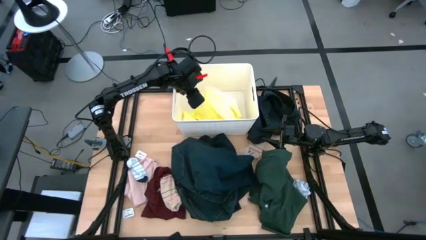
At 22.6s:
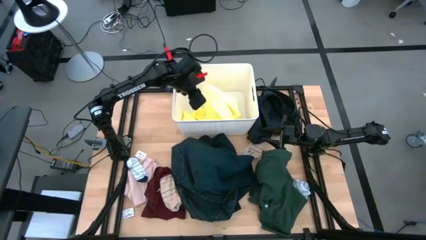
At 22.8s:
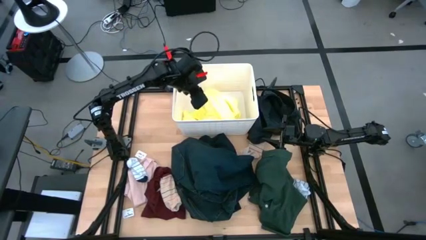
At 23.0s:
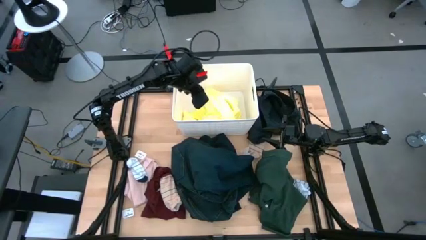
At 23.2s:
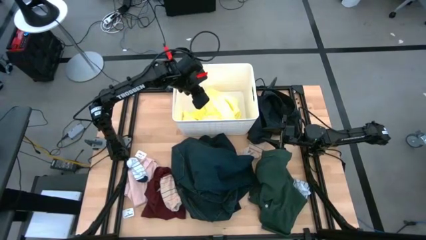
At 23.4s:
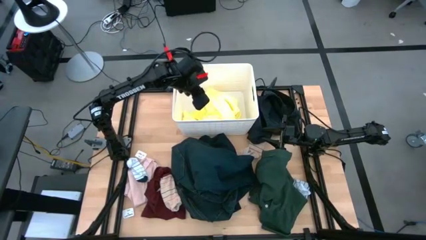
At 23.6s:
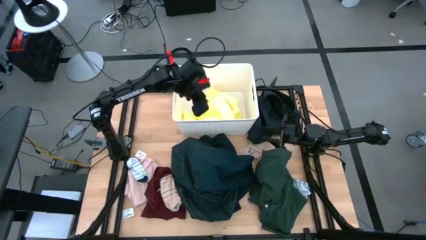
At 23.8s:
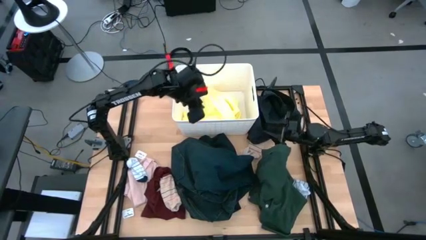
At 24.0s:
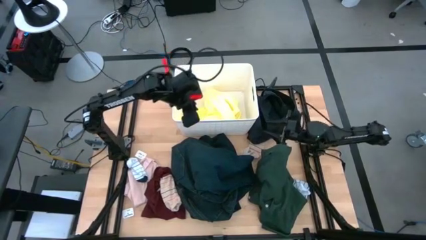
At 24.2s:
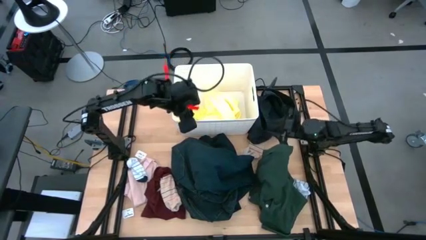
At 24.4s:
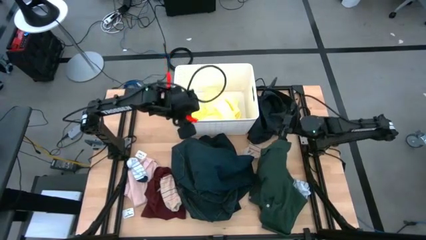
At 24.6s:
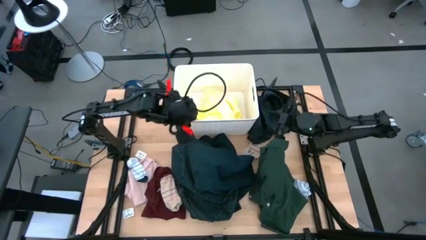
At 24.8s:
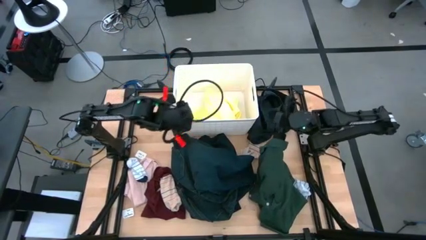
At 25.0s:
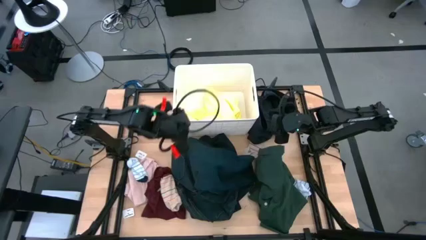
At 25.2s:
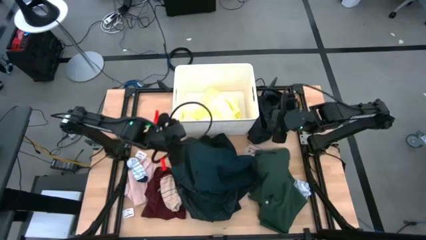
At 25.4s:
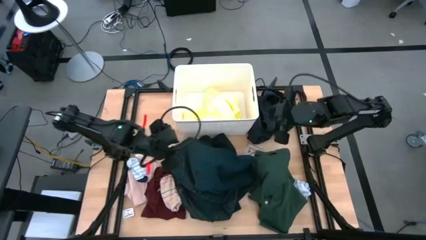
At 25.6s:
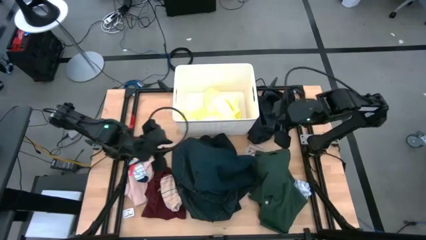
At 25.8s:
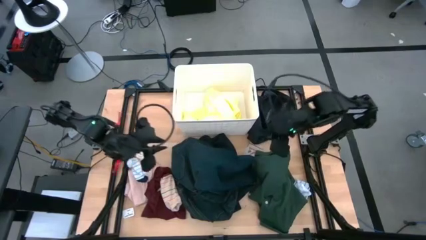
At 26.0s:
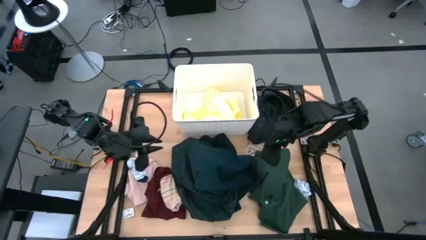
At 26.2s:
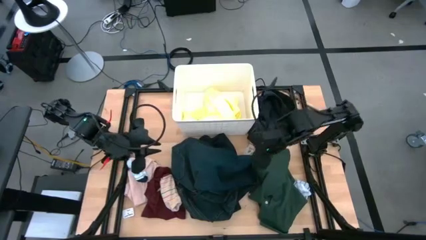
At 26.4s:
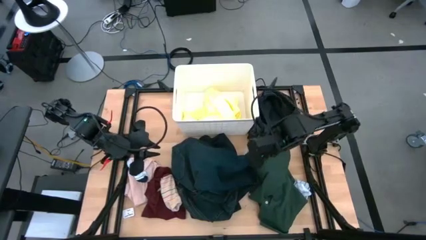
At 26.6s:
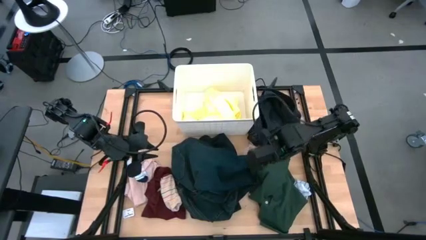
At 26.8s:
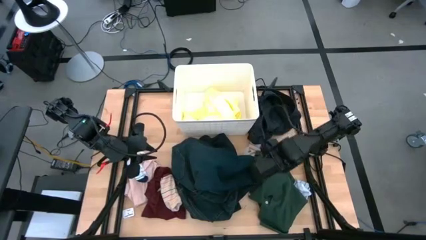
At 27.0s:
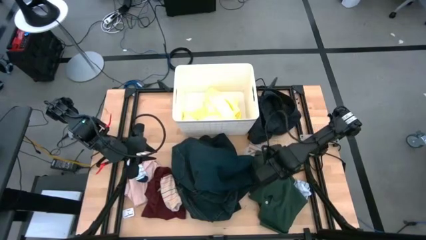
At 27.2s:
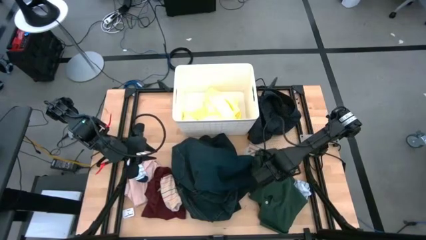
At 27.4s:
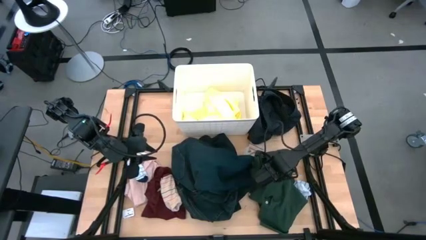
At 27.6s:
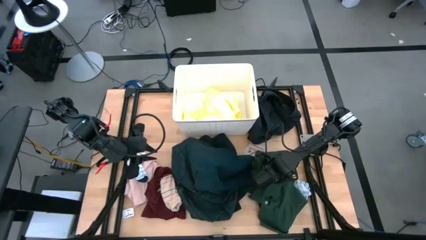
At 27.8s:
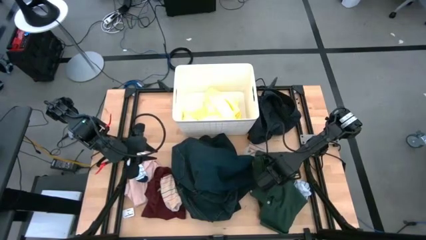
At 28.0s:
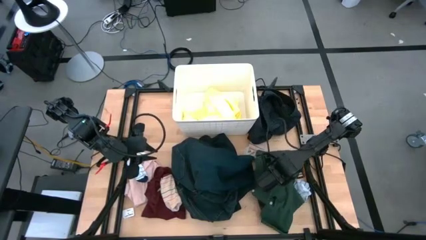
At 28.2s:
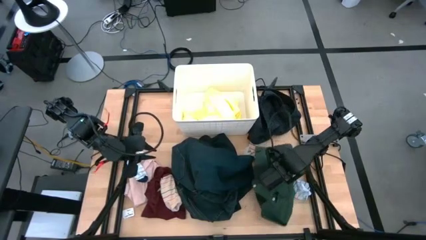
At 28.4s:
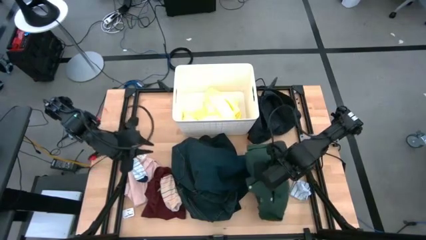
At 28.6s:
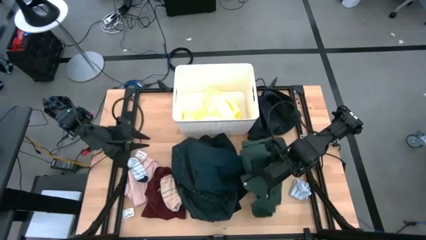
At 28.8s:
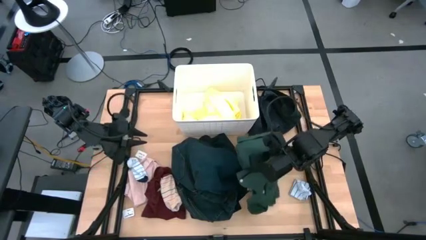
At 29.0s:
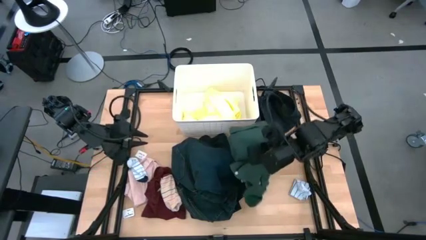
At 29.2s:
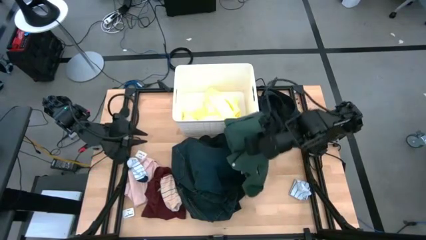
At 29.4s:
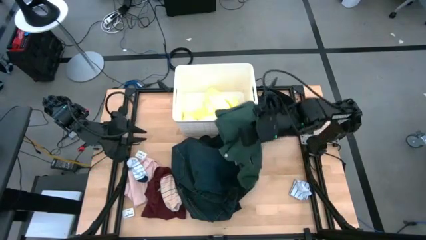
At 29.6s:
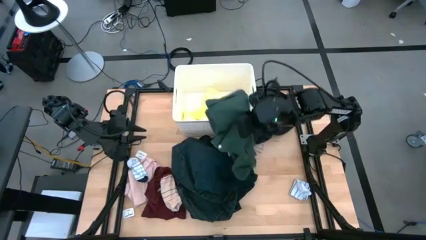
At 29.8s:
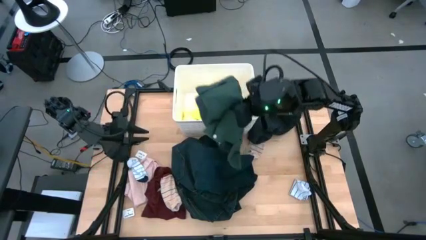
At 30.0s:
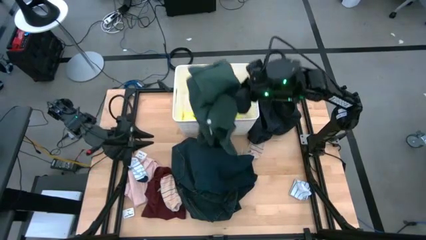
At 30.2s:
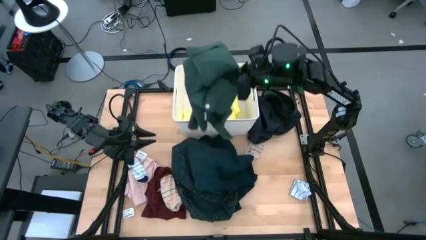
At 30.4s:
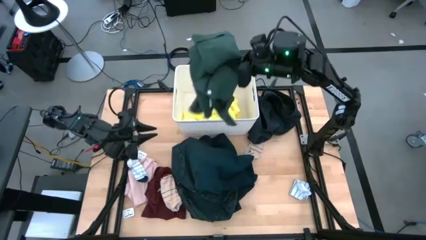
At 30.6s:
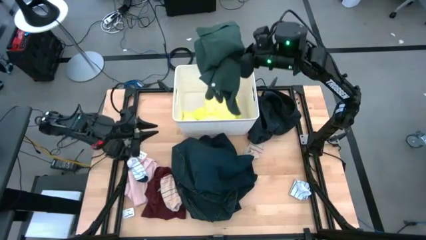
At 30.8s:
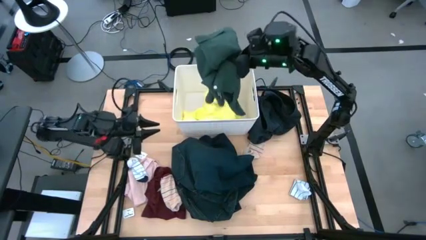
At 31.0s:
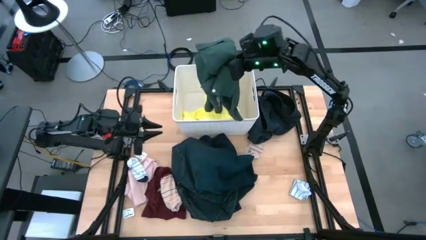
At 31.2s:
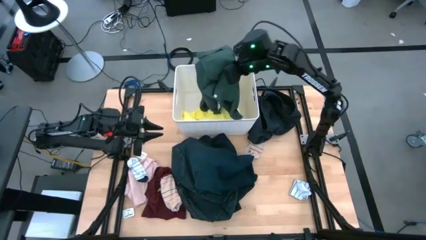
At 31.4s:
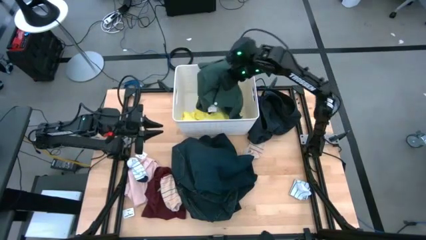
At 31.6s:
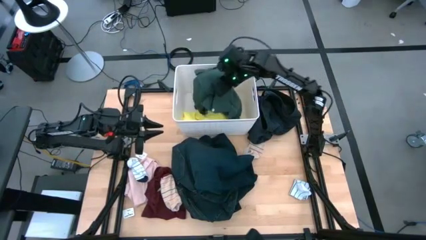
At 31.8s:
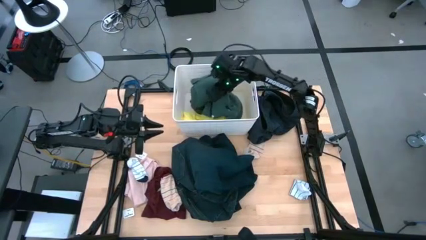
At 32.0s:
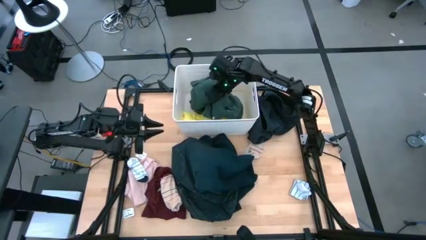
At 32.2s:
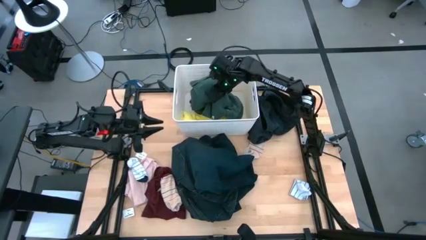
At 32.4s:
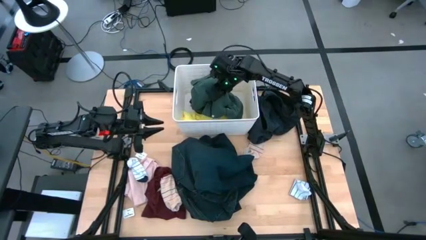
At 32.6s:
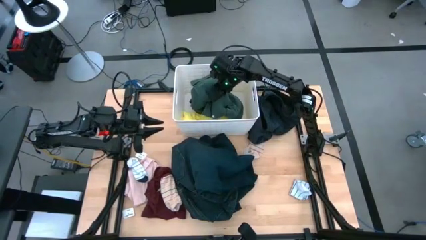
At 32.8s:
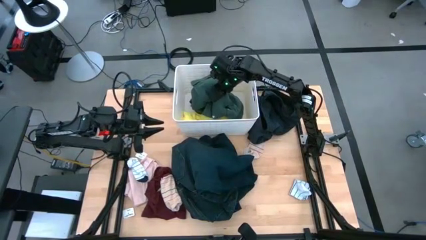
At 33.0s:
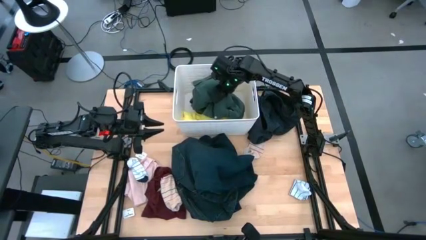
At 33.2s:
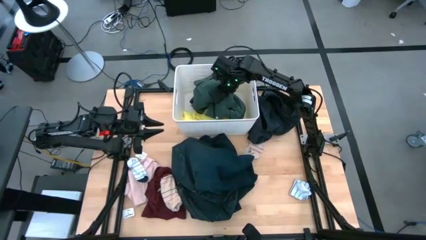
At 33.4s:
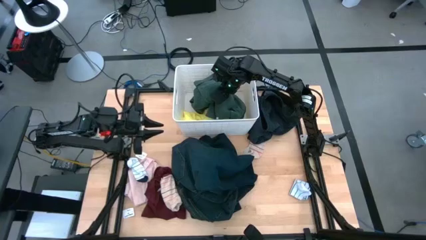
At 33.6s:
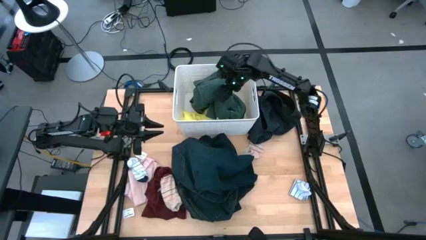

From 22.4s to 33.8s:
Task: Sort clothes
Put the green polo shirt into the white laundry bin

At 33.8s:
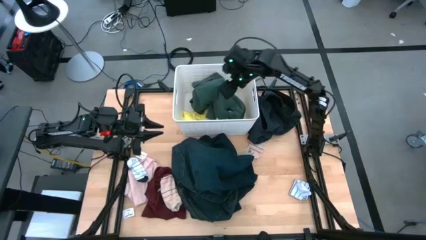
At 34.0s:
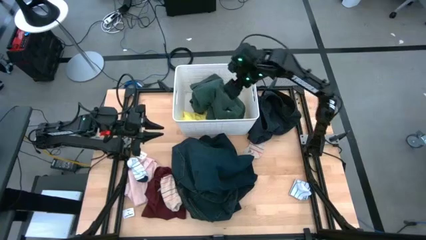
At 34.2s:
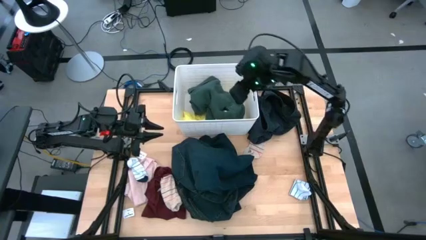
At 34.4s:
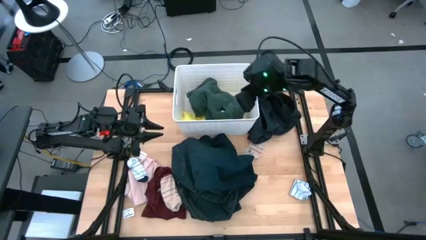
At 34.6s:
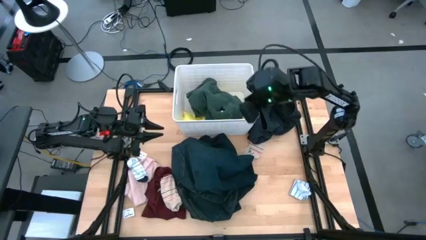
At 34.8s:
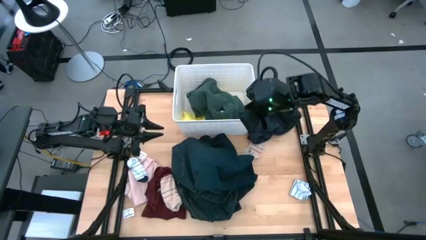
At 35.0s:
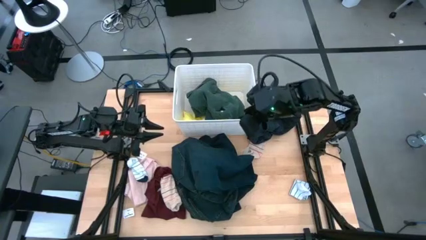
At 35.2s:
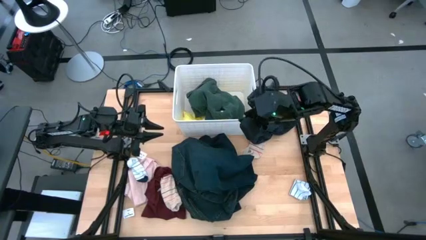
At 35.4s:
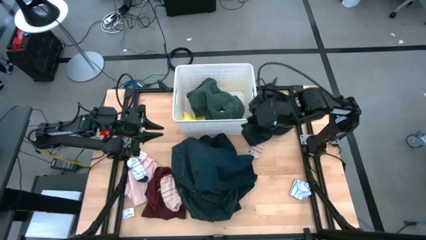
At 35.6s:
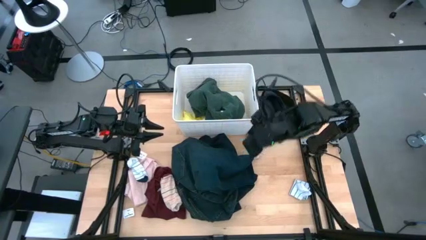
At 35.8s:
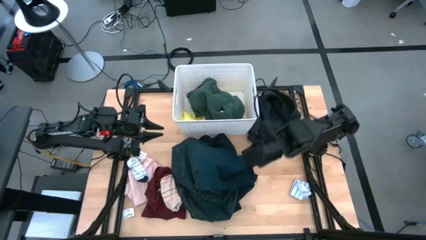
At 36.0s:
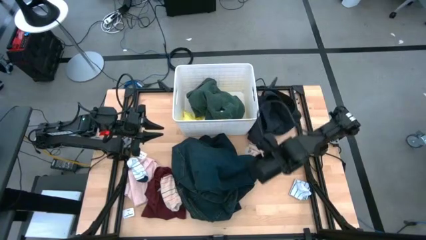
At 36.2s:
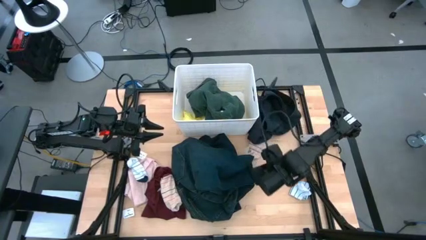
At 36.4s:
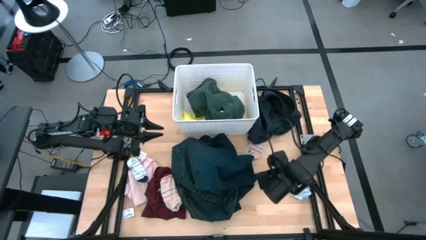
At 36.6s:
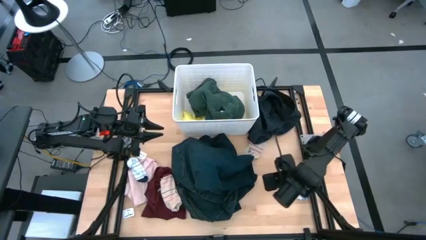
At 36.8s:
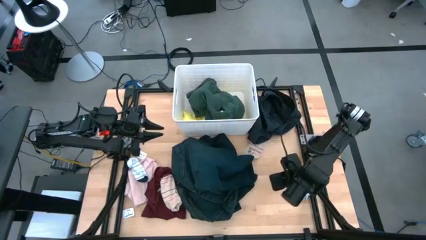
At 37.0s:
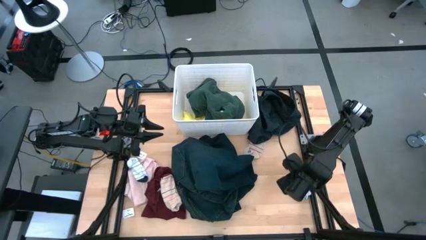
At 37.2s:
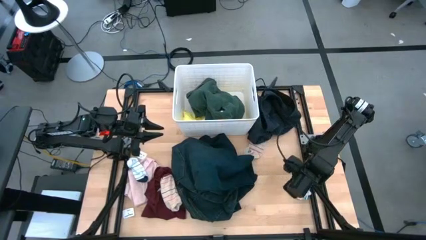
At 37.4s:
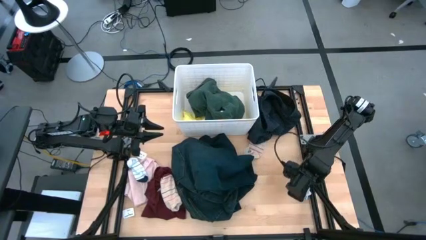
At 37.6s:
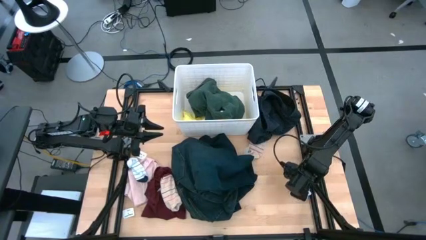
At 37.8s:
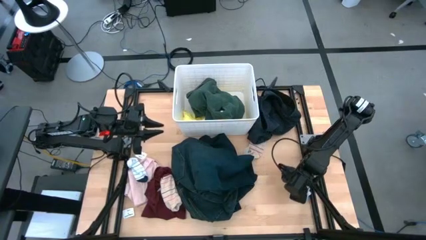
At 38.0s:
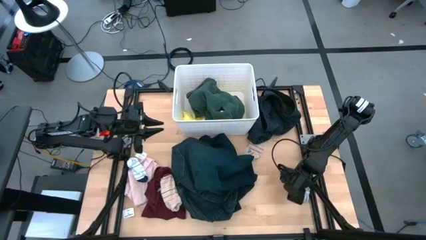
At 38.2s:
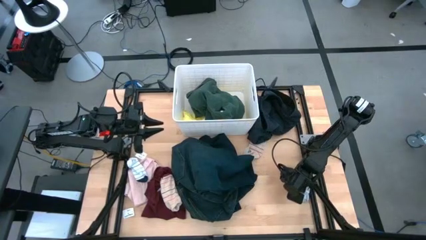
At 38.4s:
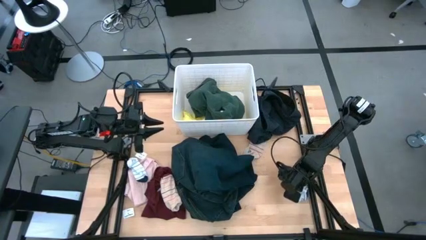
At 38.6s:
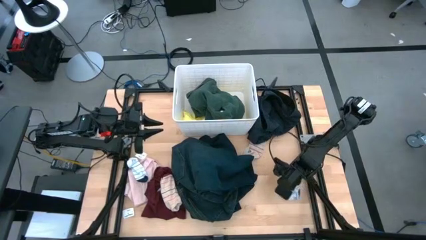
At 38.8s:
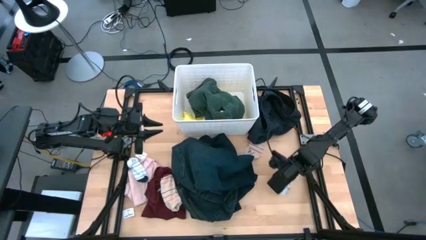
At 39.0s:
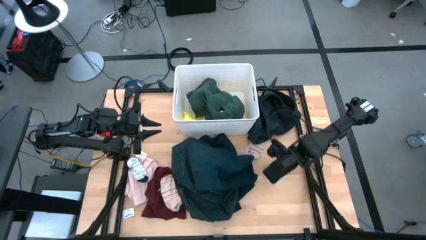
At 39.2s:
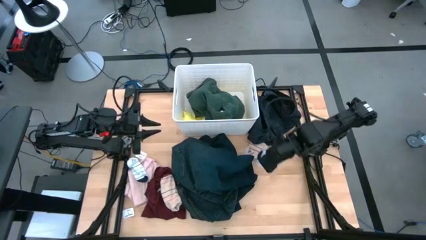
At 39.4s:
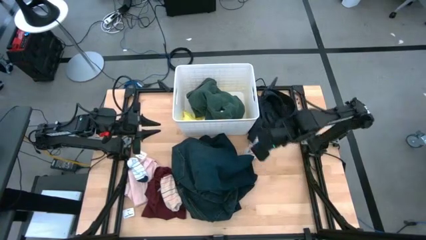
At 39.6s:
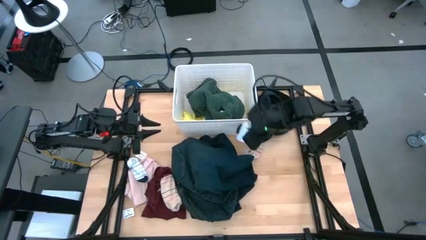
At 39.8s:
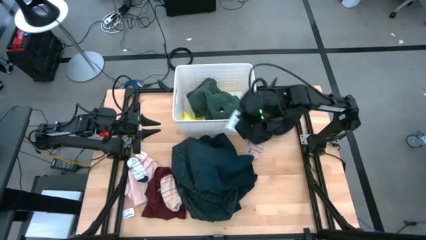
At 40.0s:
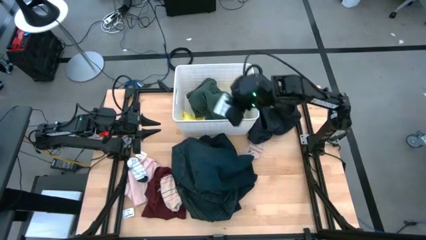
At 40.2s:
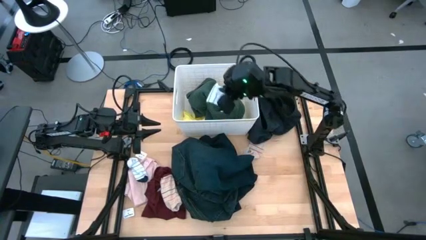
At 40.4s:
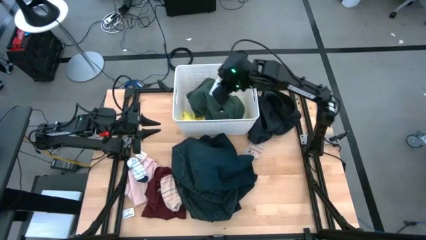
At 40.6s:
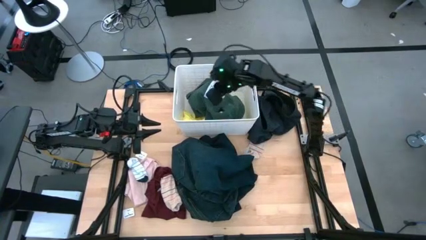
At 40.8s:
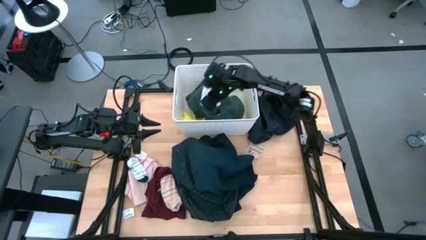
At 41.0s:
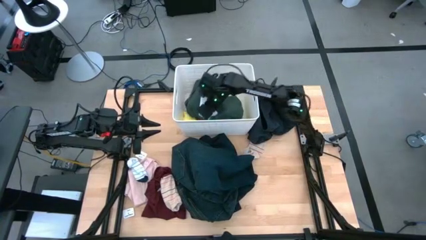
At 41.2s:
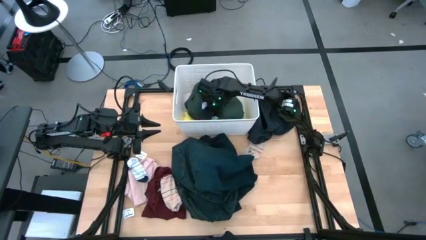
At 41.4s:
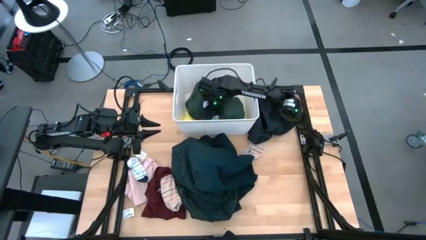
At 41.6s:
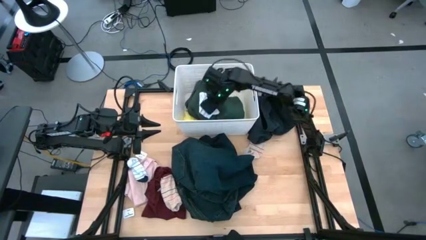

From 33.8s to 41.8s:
Put the right white sock into the white laundry bin
